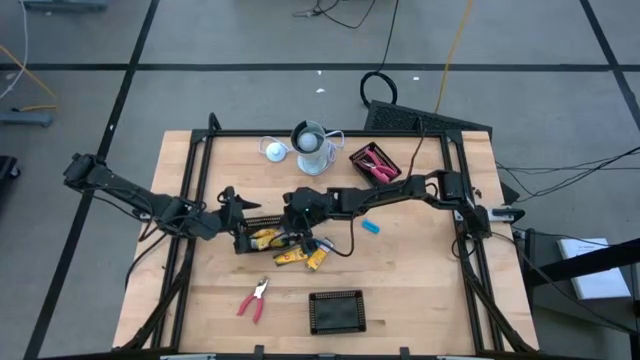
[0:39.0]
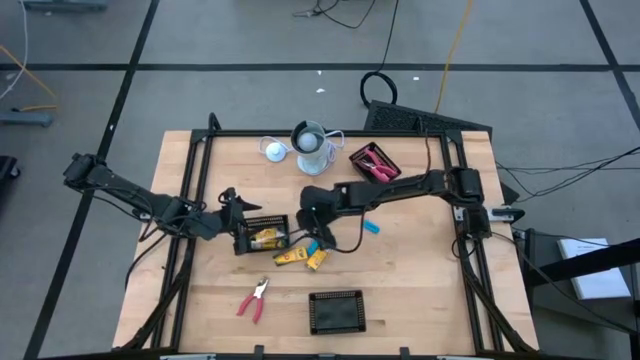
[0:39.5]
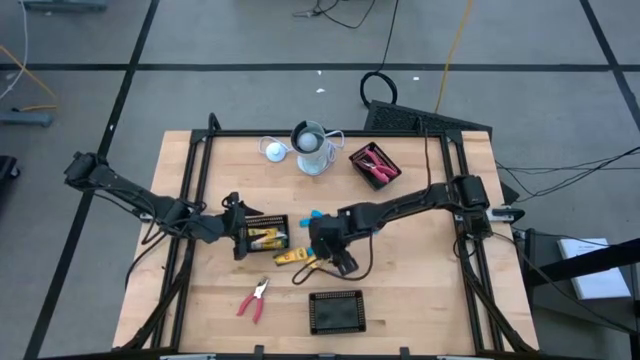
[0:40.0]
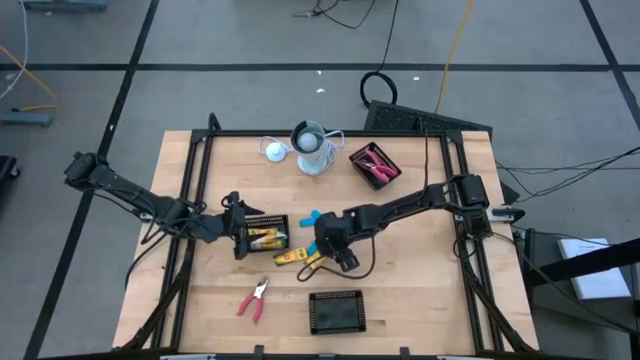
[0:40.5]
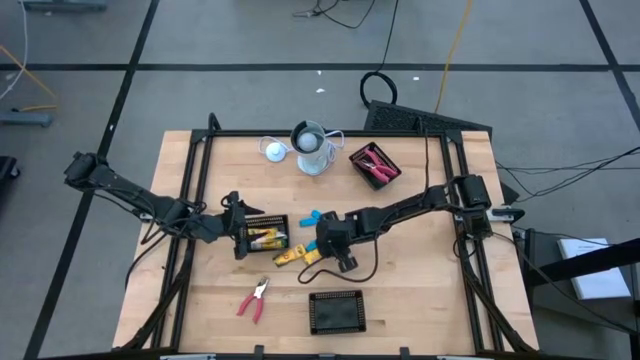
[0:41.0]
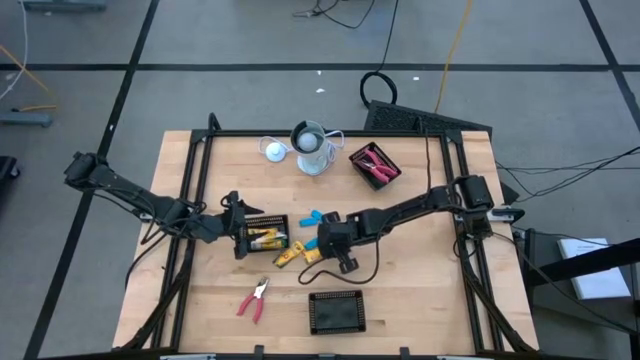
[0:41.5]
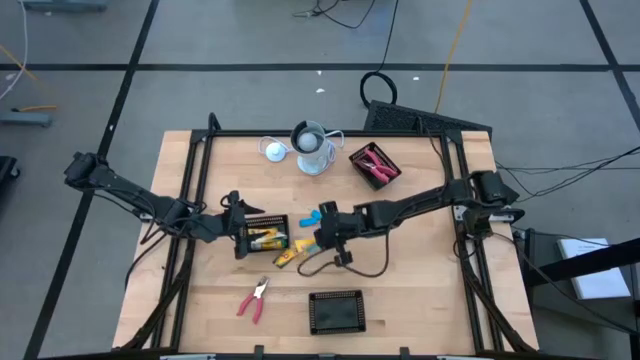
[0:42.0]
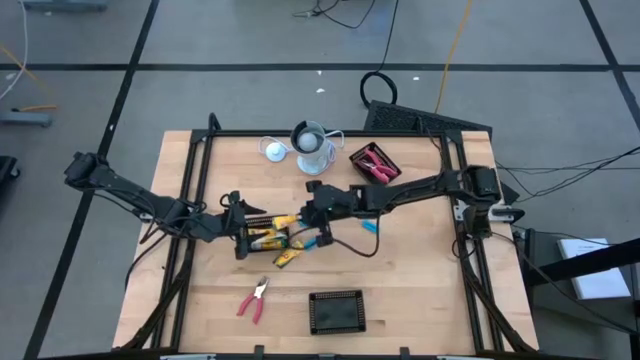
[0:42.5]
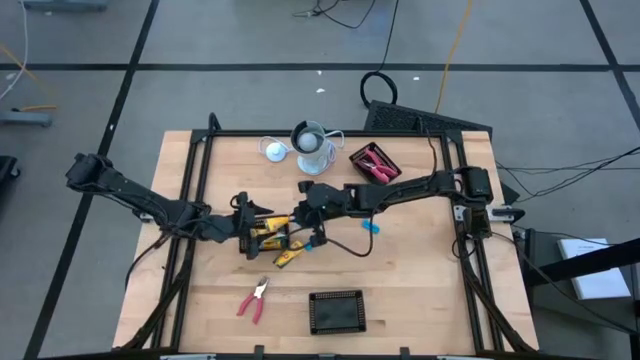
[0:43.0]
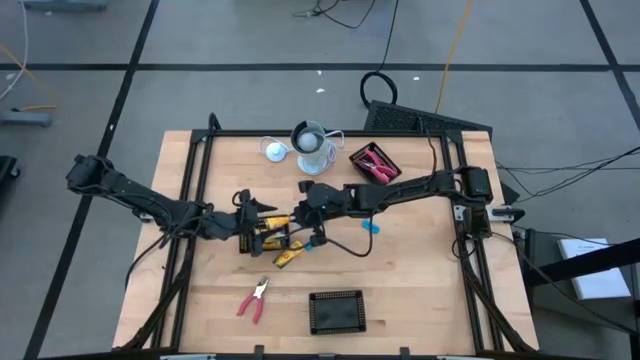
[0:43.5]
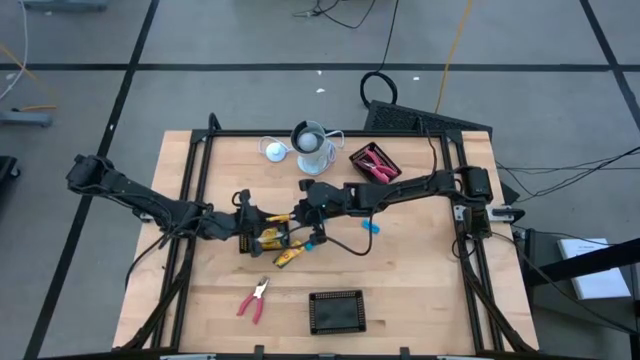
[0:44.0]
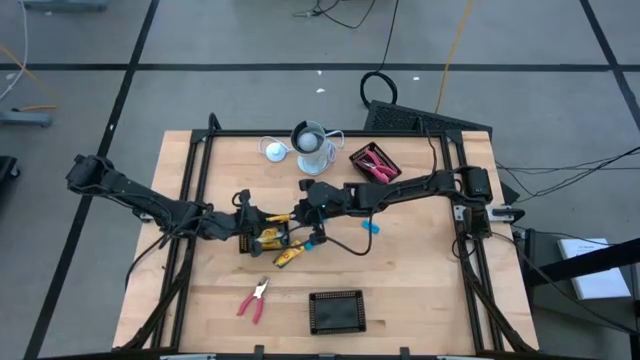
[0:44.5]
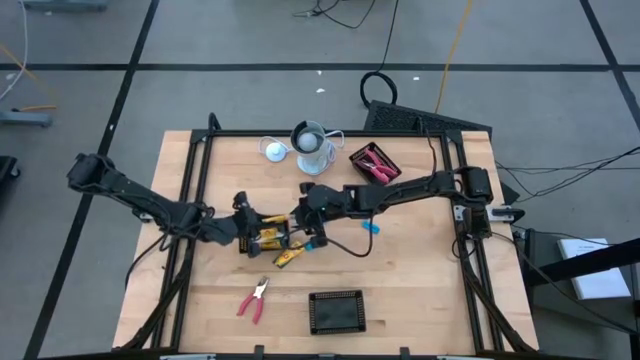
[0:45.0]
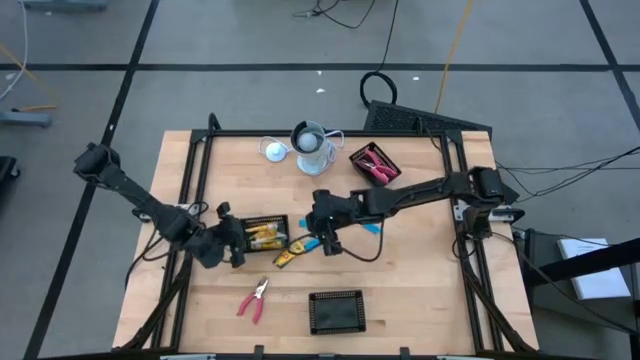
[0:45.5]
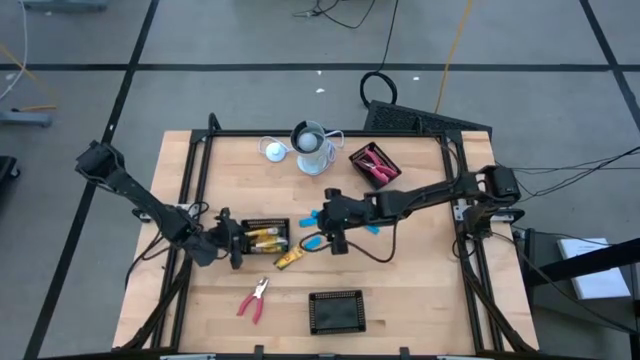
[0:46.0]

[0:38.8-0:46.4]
Task: Pick & Place School Supplies
Put the yellow crayon box into the middle black bin

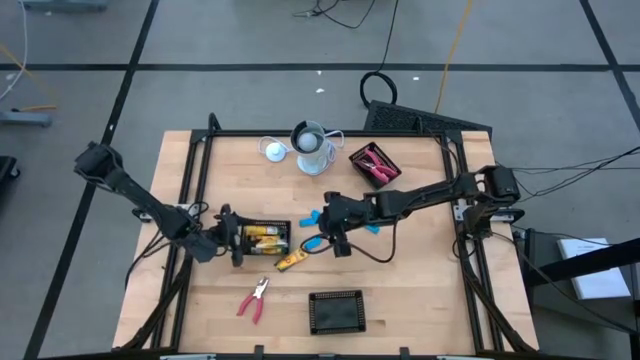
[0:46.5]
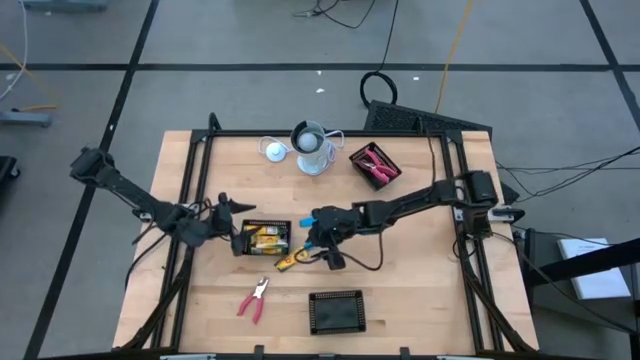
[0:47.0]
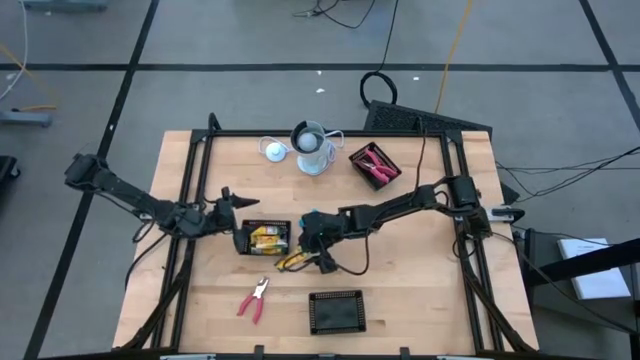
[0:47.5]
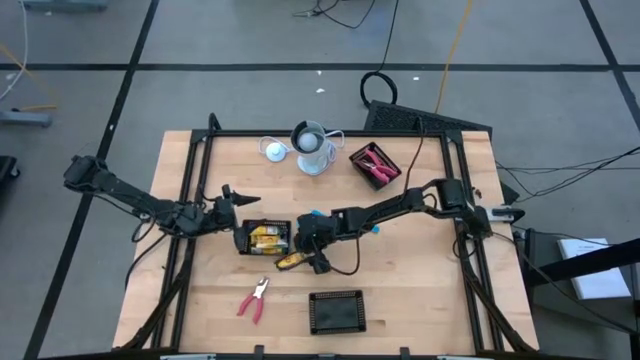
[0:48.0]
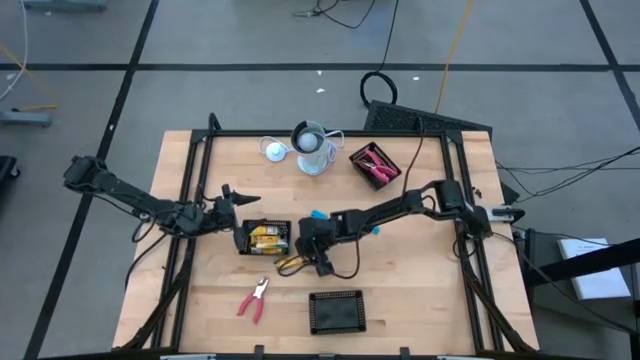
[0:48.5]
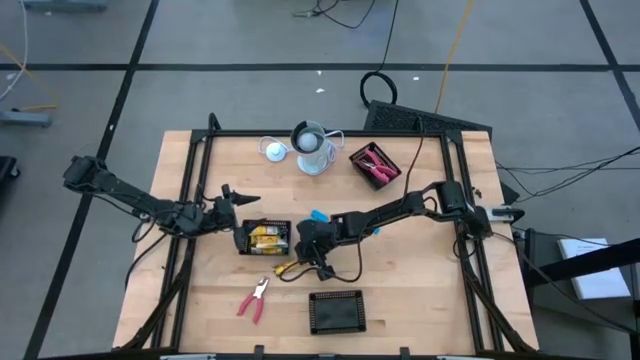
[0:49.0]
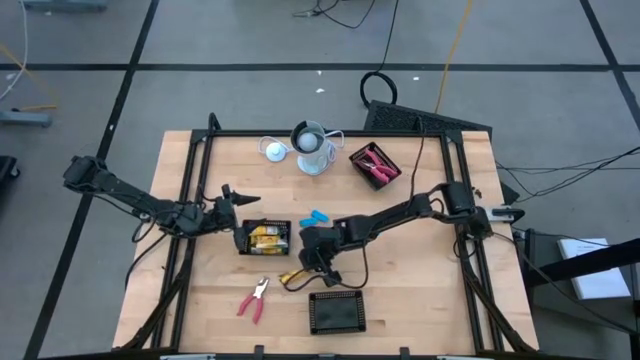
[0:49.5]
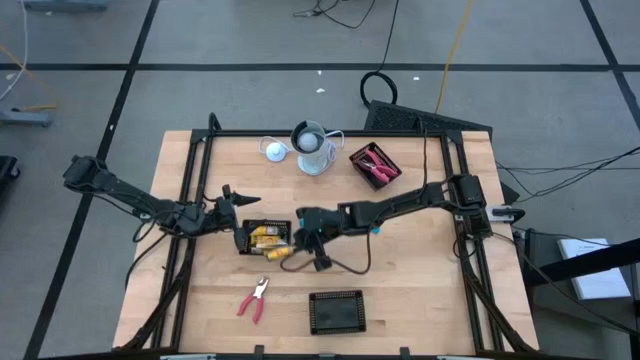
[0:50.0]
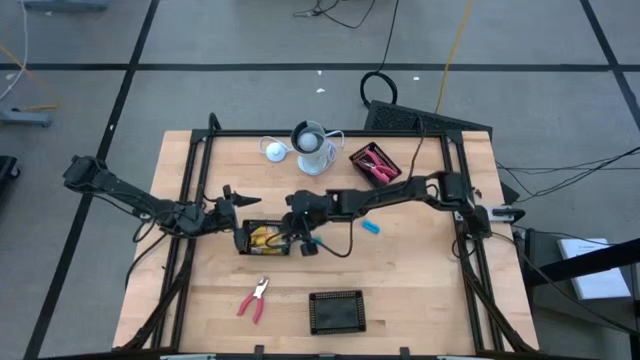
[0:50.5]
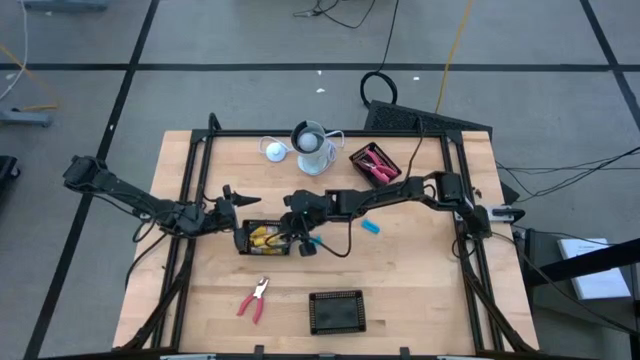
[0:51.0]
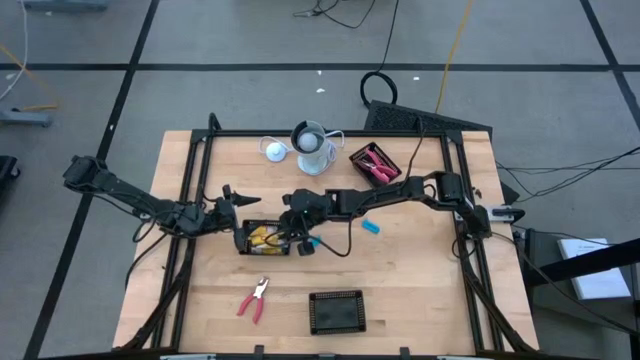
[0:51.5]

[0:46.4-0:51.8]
Put the yellow crayon box into the middle black bin

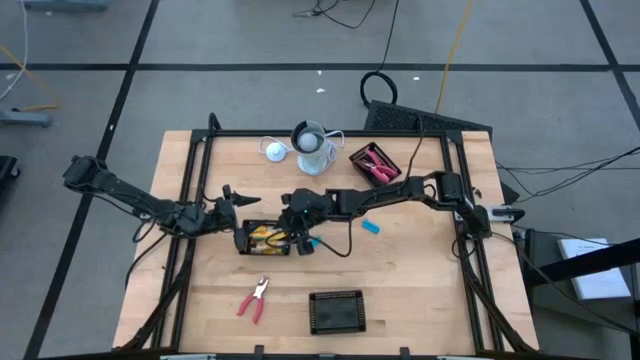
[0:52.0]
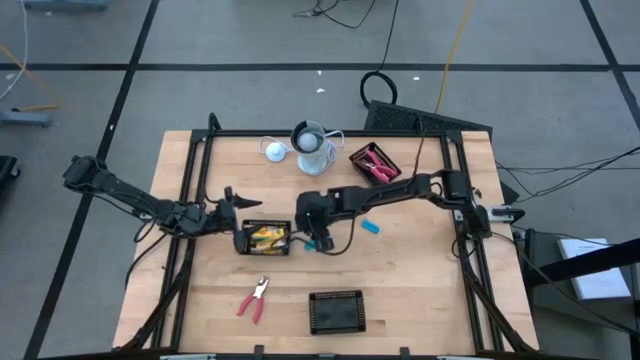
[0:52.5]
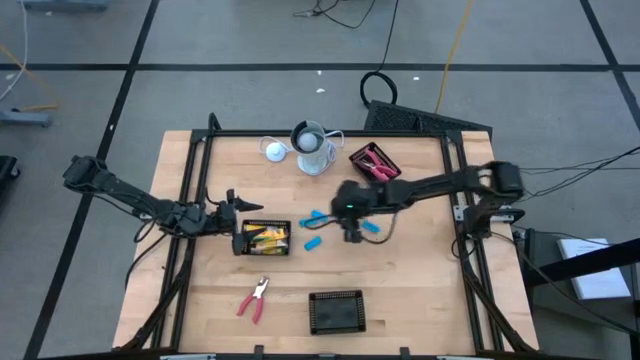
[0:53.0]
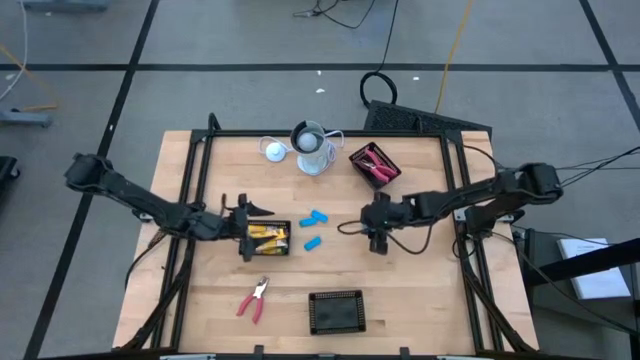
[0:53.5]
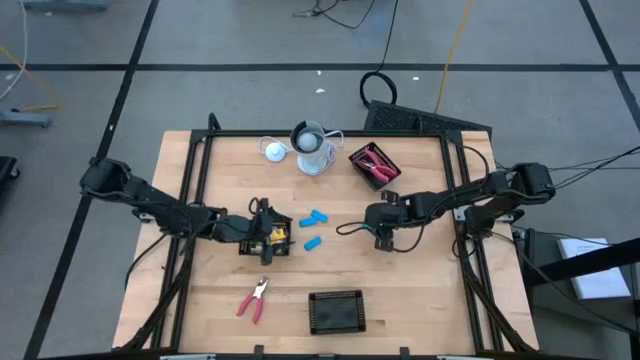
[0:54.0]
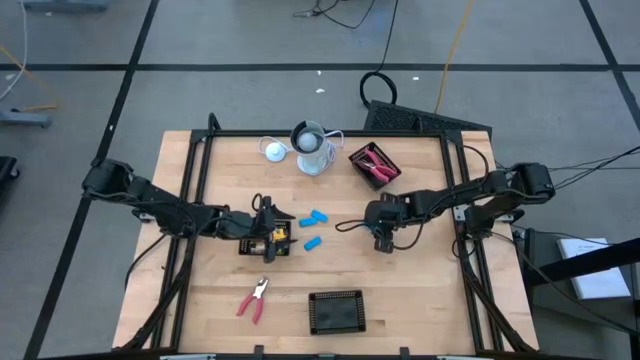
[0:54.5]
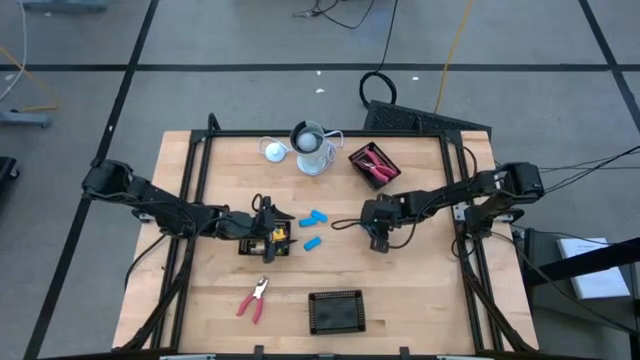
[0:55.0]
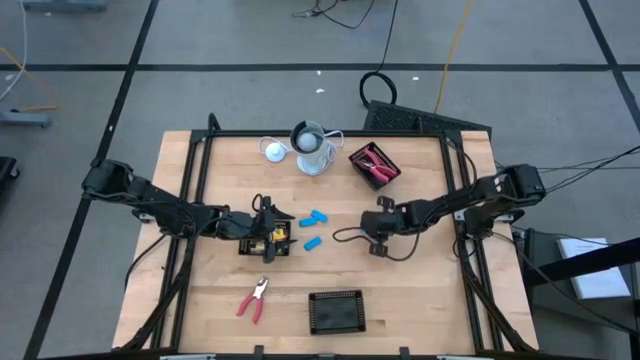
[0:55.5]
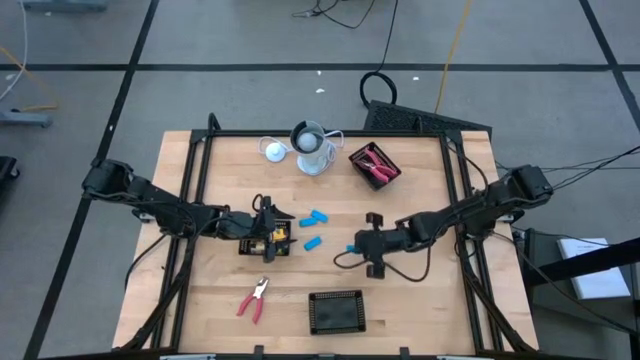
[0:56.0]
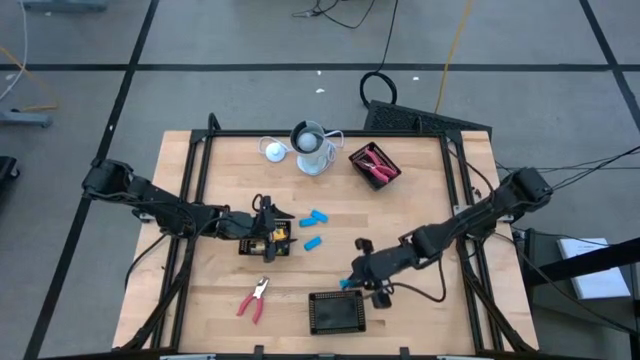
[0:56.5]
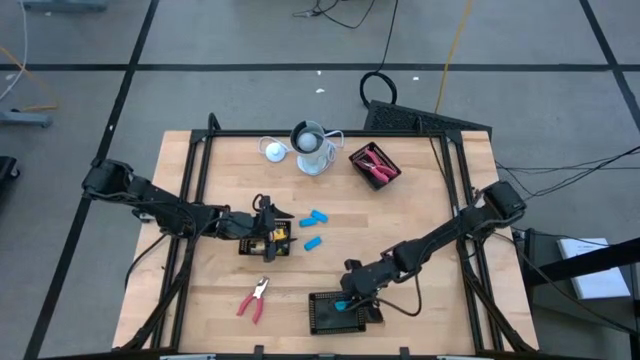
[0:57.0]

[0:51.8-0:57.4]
Put the blue eraser into the bottom black bin

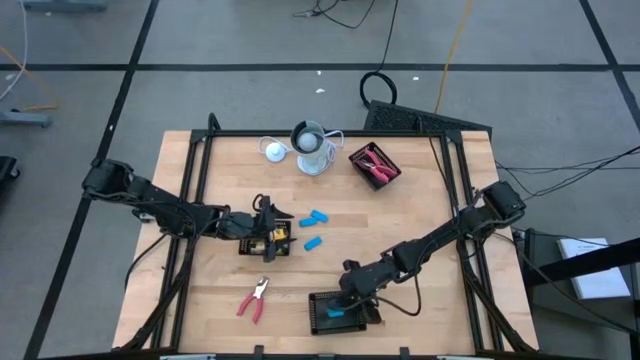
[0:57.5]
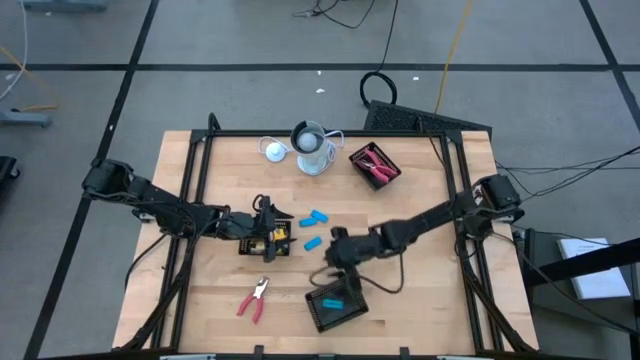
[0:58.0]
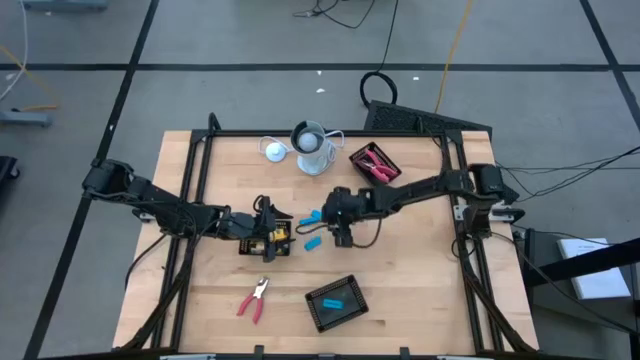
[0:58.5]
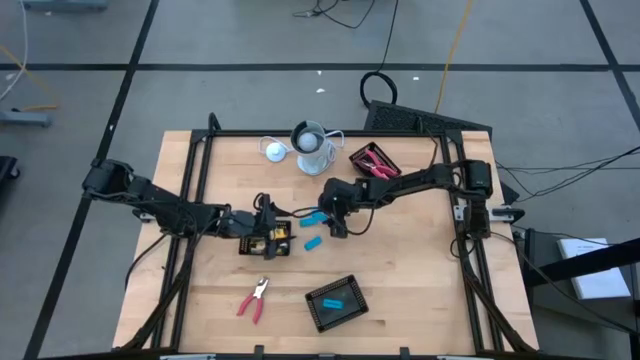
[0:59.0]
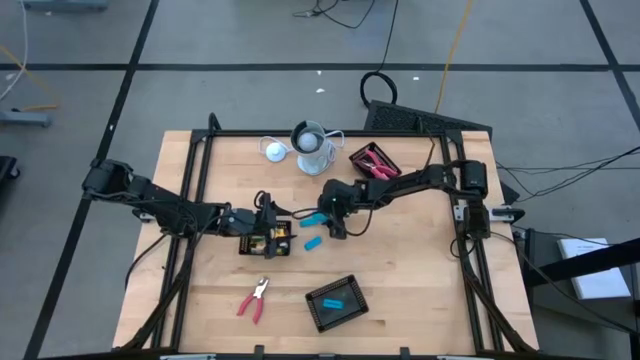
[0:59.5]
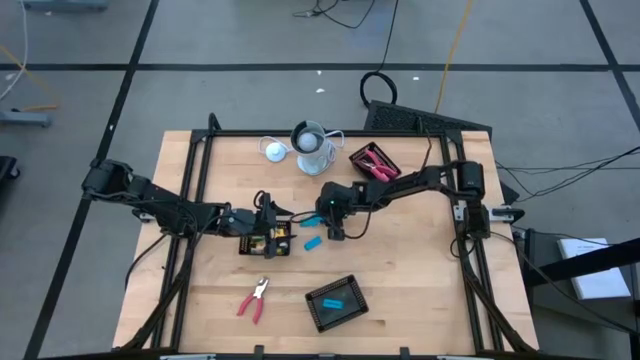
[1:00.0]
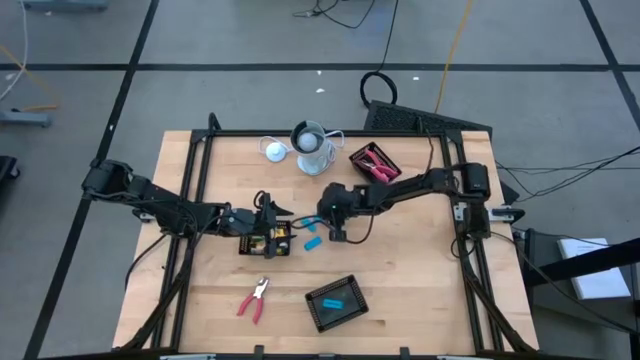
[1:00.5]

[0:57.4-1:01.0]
Put the blue eraser into the bottom black bin
